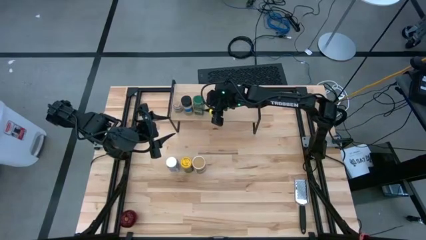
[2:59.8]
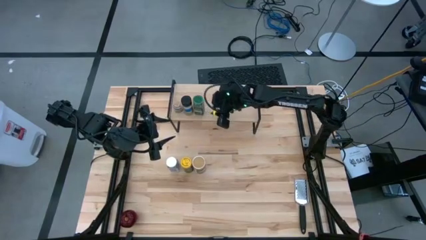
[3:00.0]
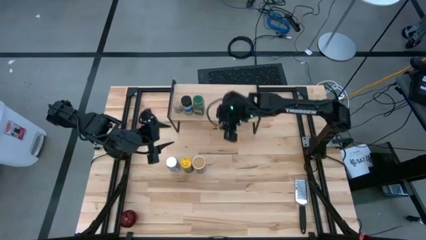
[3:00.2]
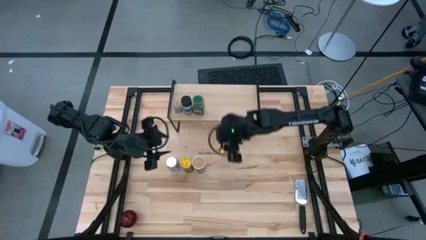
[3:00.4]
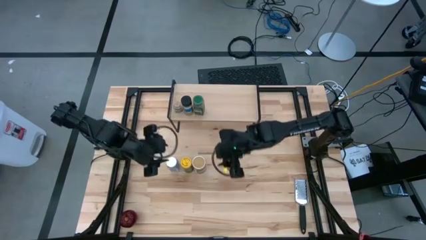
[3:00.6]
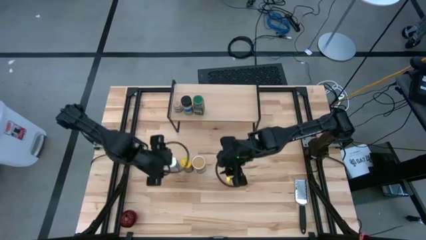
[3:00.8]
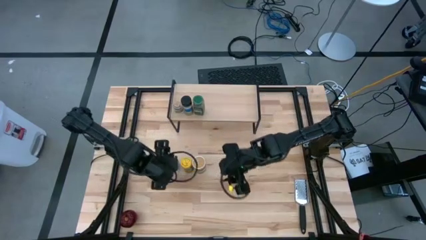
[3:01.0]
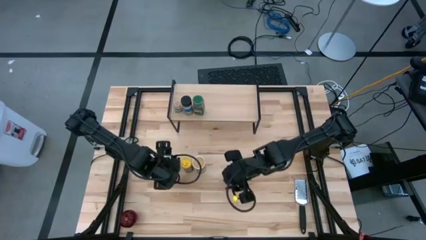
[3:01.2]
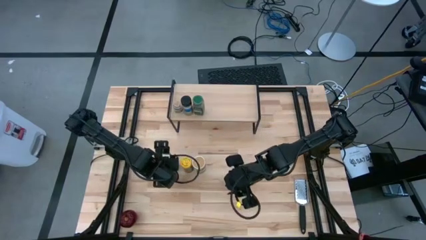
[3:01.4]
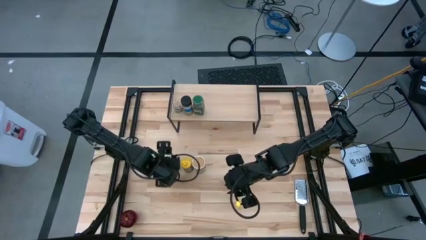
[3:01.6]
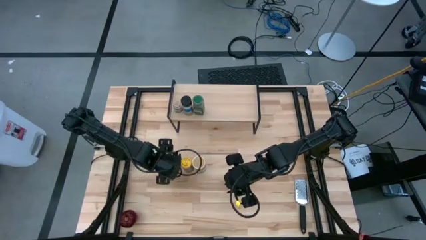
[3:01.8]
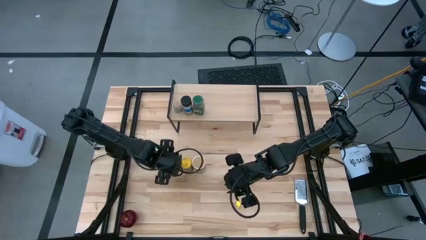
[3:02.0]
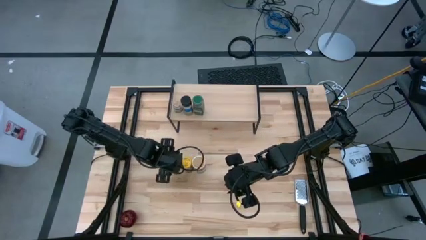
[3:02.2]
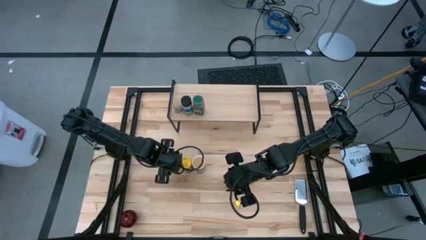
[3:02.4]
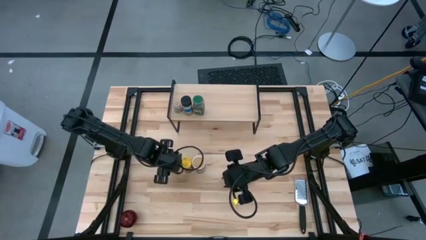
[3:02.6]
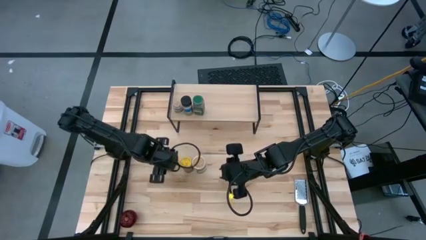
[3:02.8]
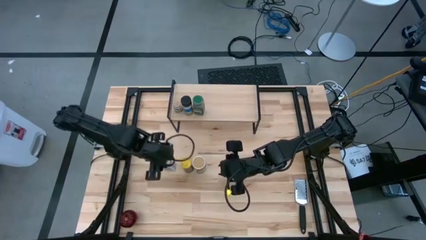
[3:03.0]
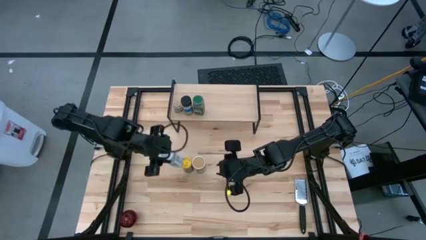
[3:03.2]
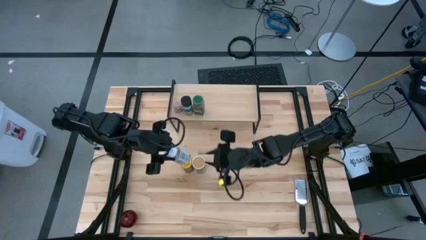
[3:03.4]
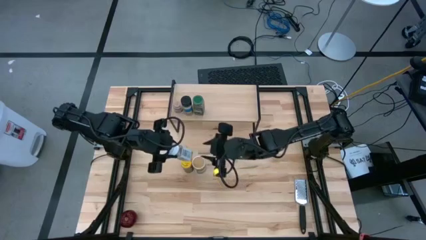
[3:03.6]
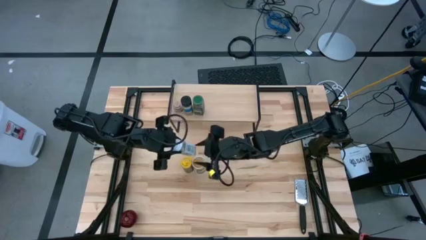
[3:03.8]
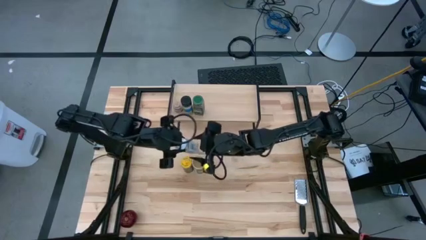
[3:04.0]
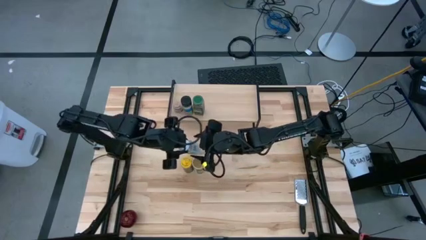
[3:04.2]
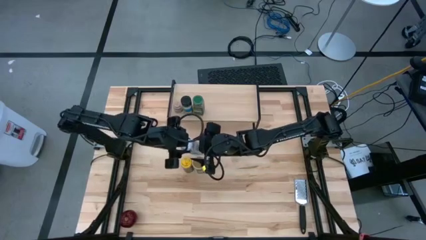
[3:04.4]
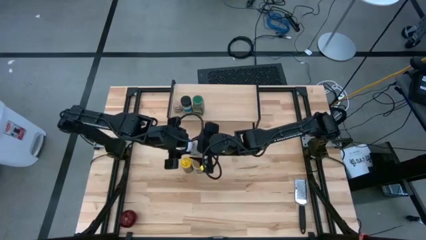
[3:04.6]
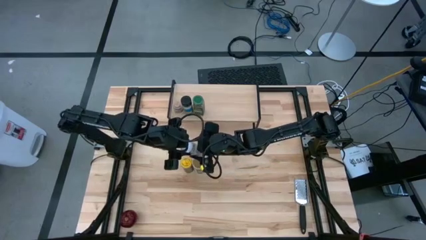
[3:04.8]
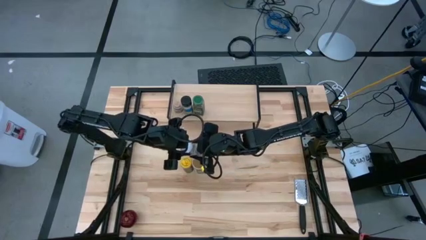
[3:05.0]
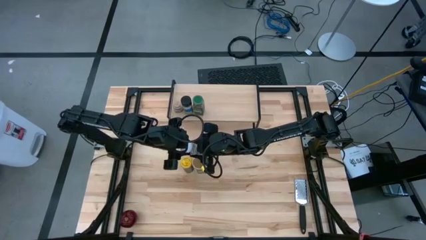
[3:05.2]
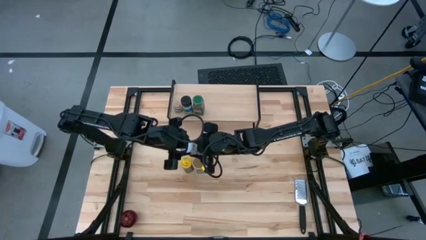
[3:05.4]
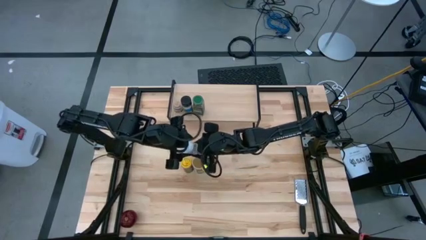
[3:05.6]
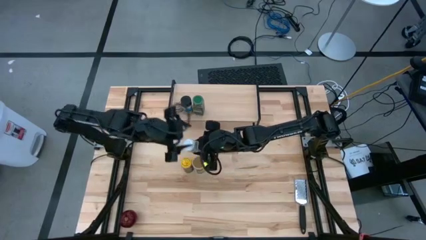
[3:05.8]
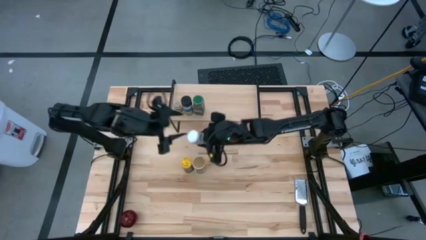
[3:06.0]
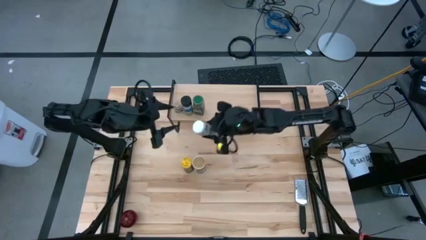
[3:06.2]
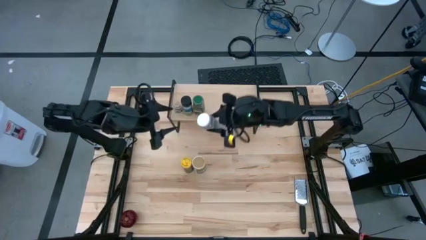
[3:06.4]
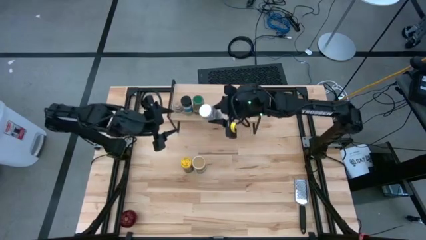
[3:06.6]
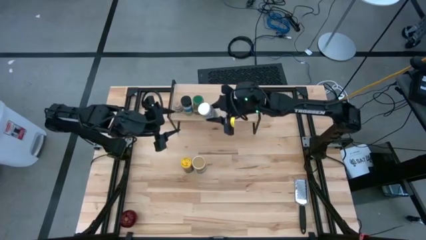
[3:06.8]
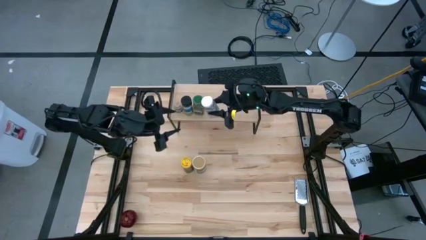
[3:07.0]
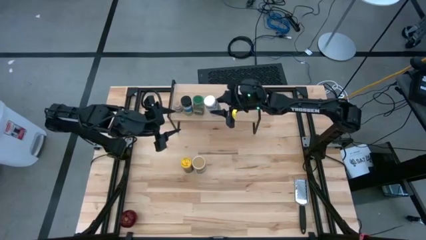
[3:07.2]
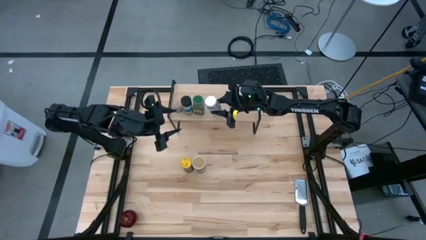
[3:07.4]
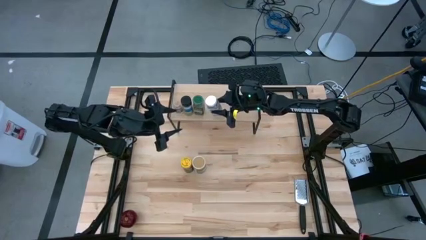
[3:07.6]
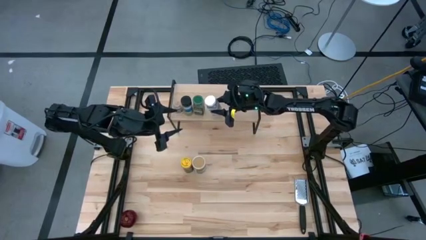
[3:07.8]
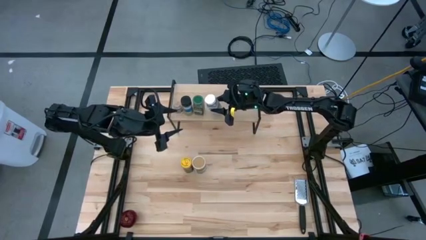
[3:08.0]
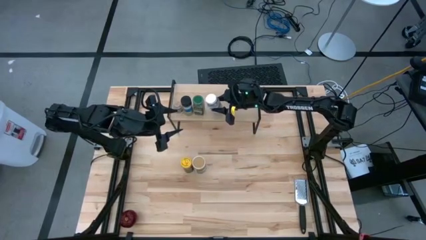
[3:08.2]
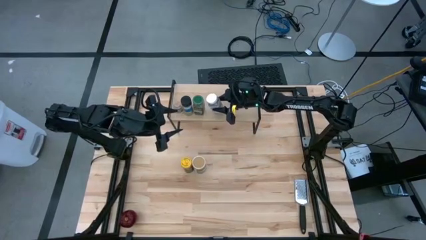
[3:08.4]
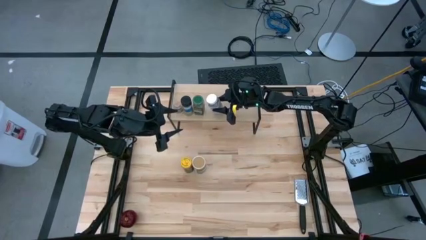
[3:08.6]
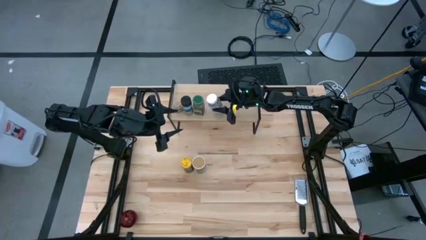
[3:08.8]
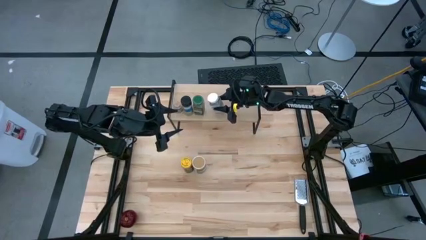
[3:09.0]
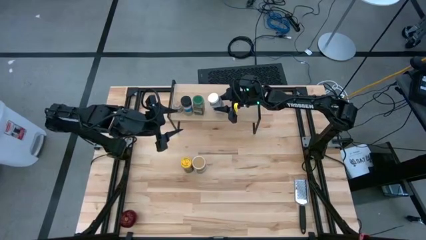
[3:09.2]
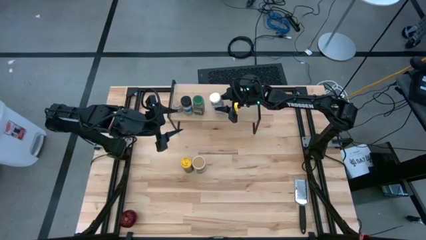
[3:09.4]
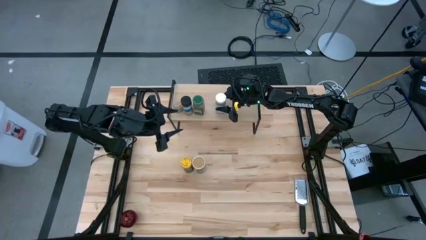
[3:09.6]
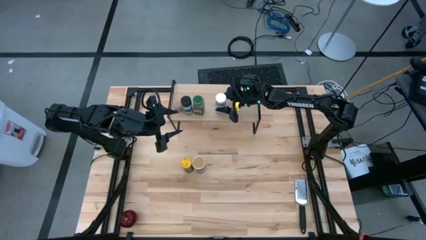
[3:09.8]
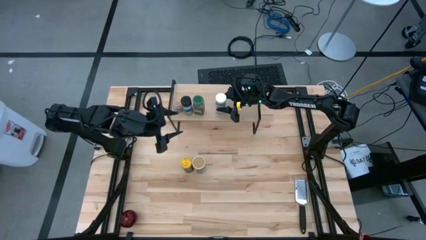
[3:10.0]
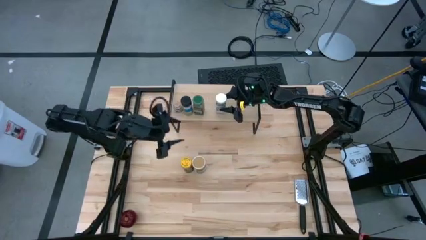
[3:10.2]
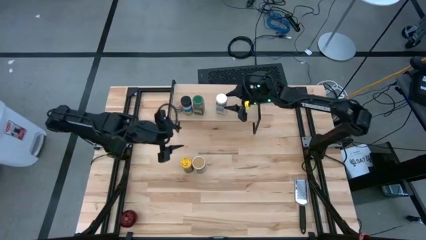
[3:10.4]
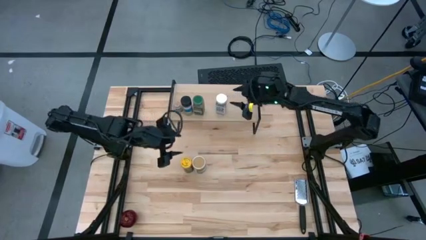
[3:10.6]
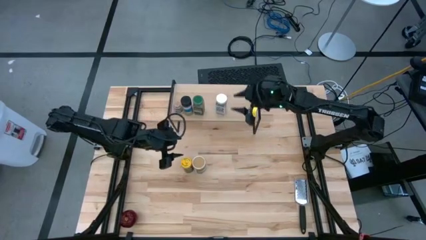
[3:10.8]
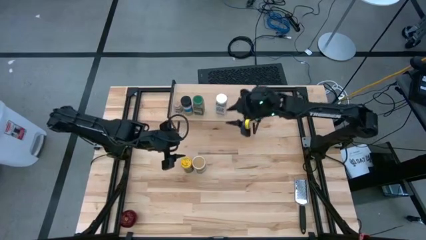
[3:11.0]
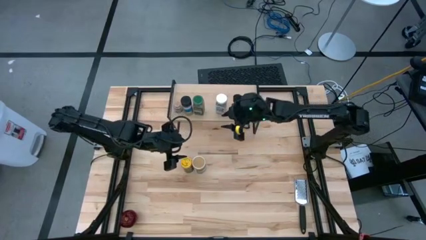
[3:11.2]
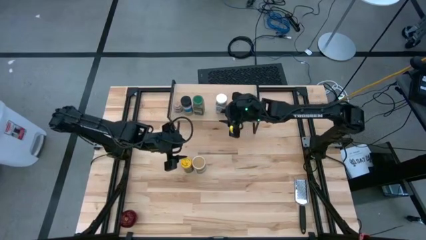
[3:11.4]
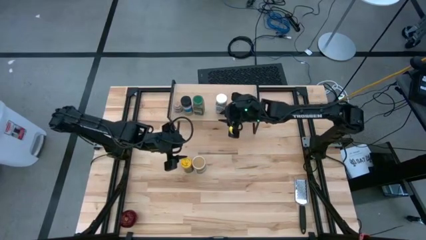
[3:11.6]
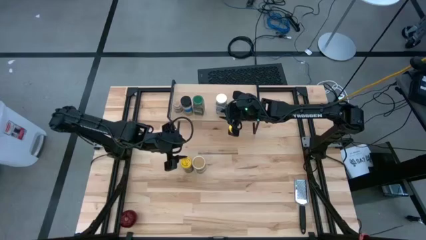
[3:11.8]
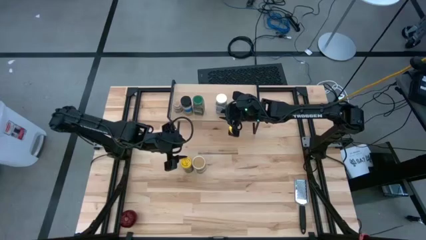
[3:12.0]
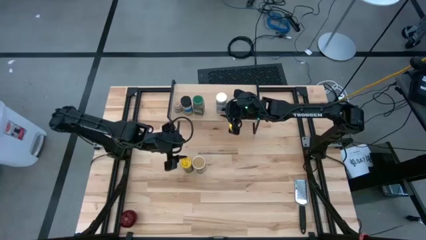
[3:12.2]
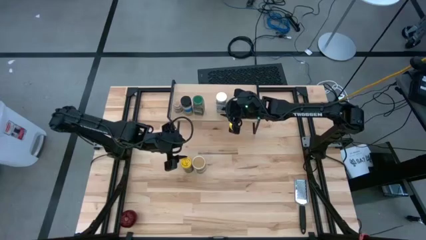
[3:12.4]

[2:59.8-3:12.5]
Task: Shelf spices
Put the white seasoning bottle on the shelf
